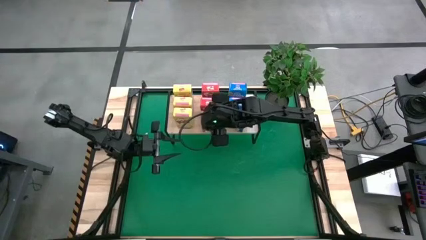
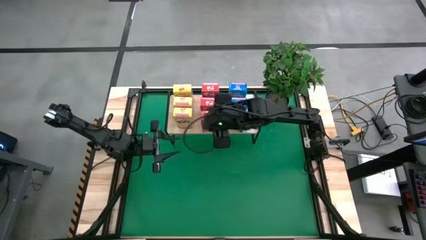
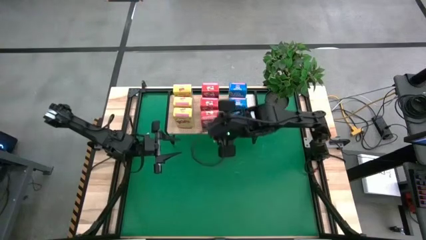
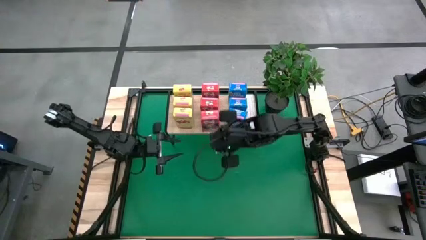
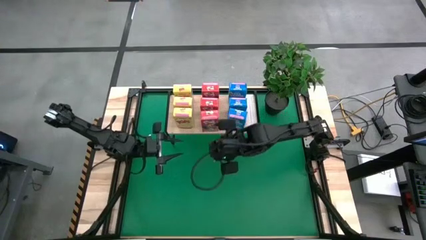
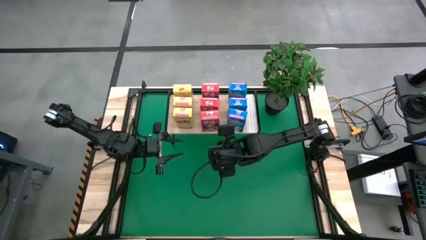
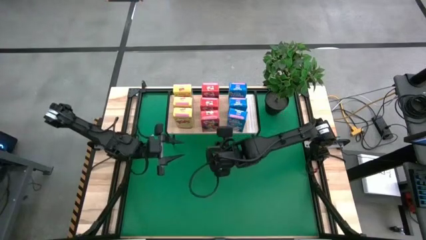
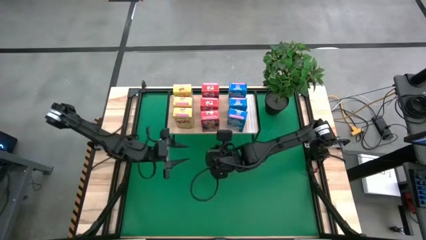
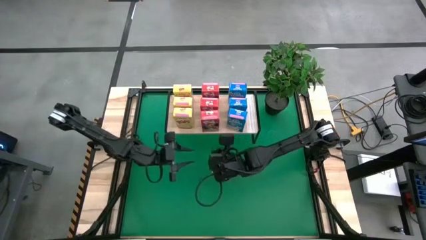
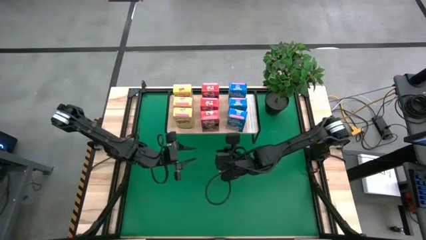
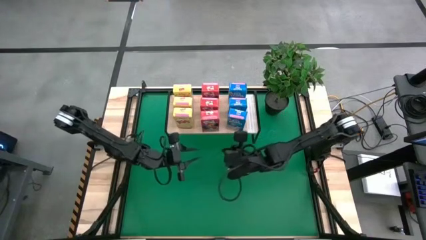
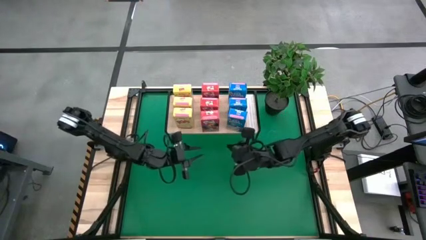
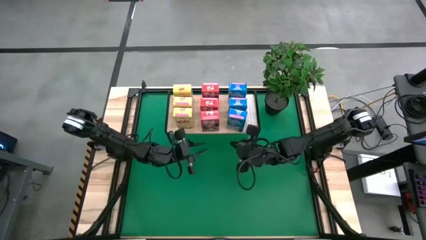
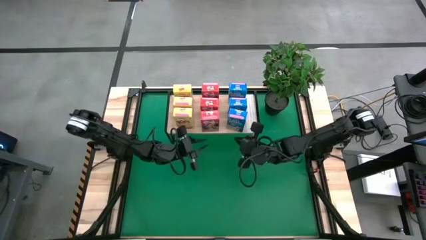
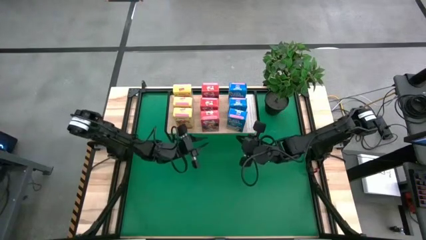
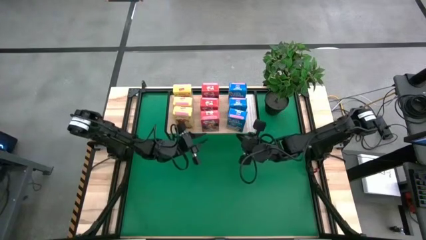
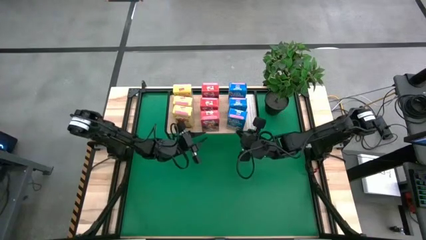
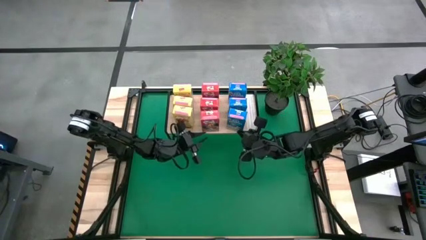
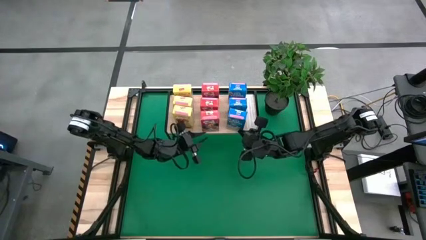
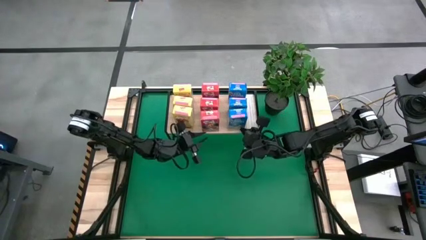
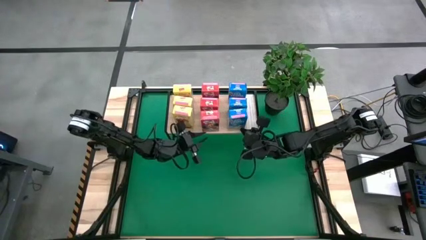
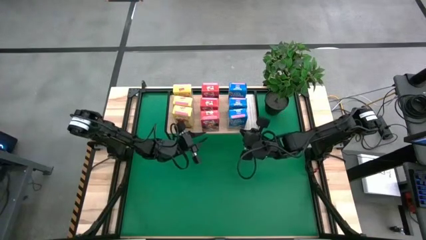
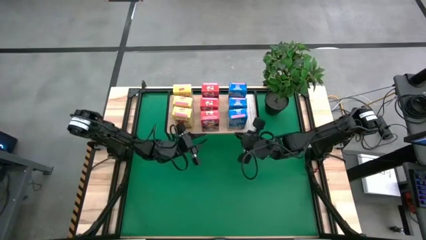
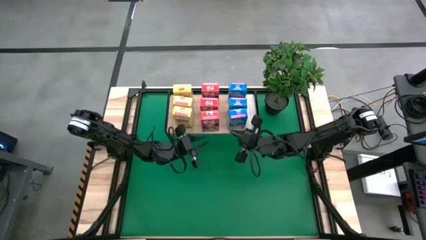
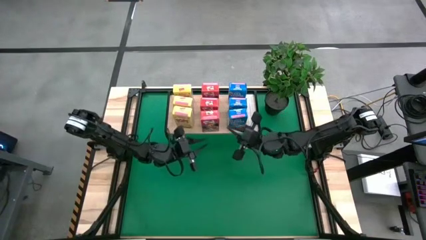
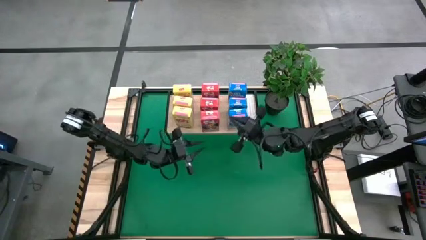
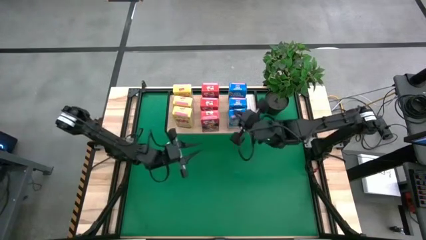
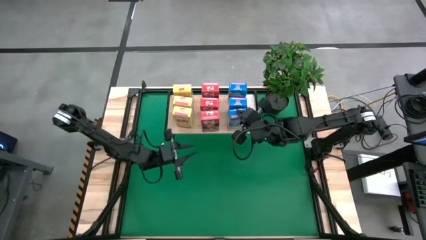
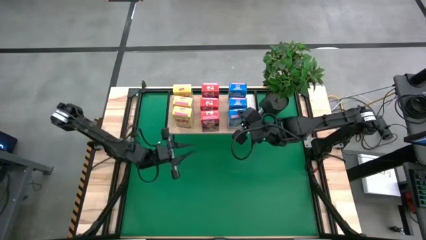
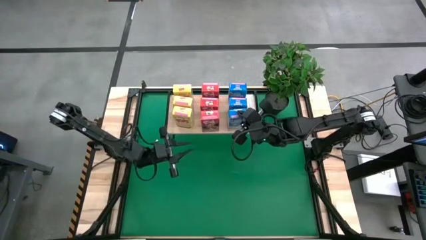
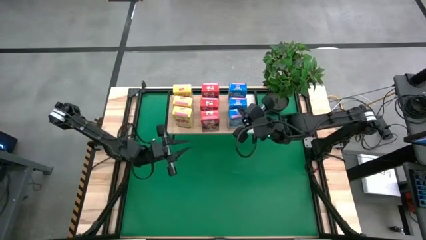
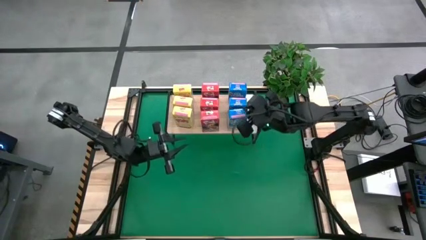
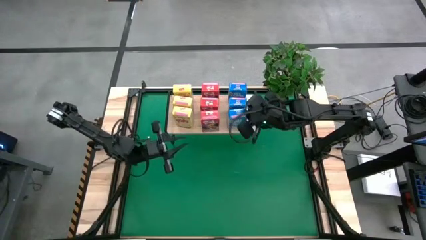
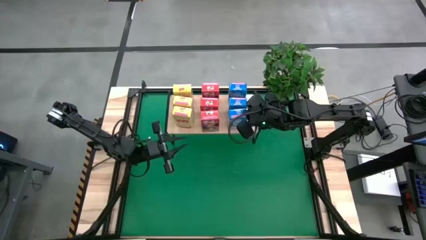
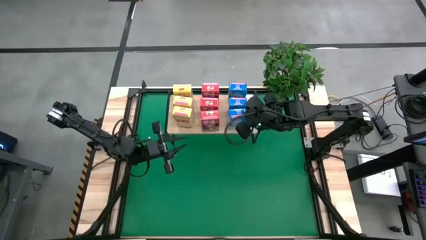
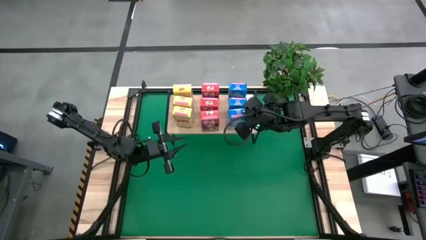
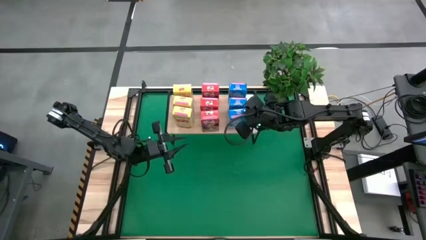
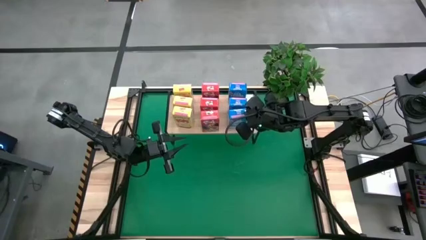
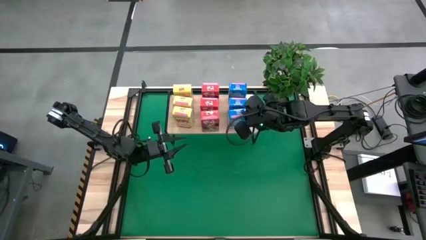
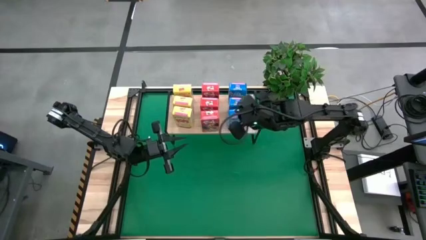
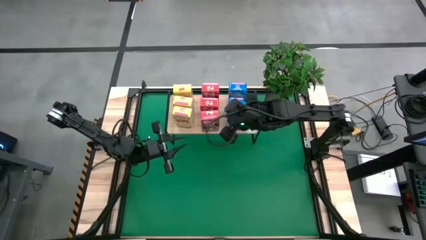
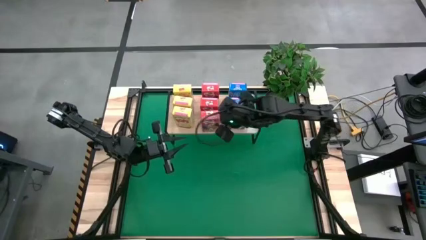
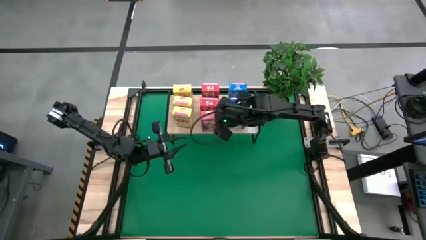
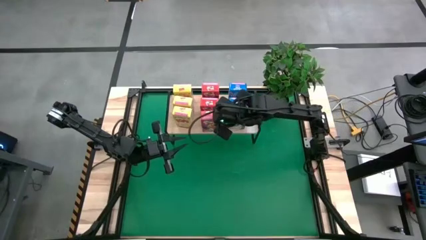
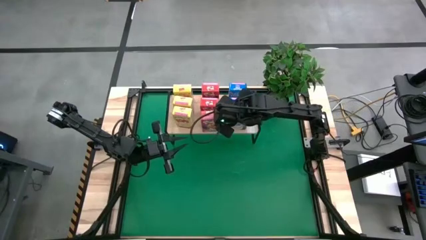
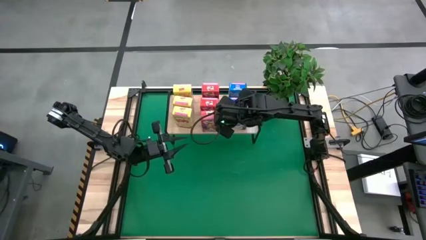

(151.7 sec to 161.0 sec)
Task: Stack cereal on shelf
Adjust the blue cereal box on the shelf

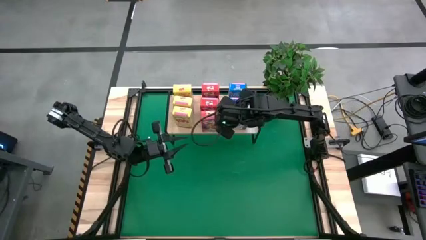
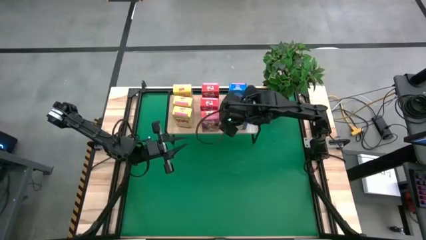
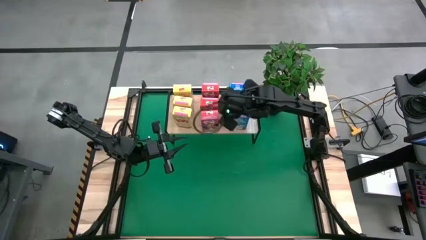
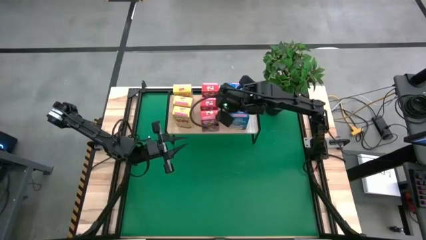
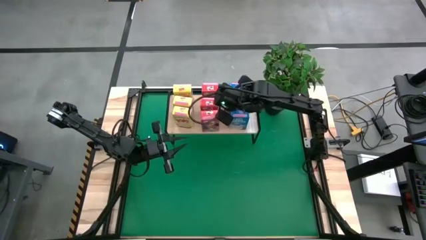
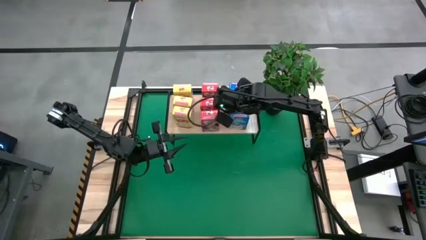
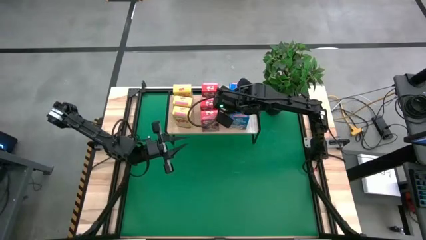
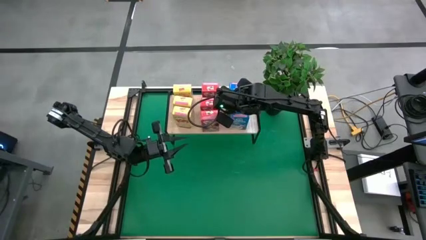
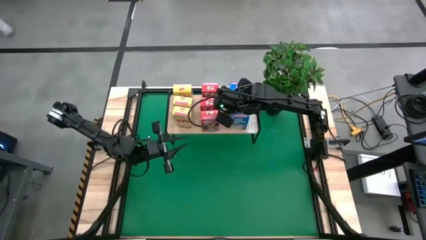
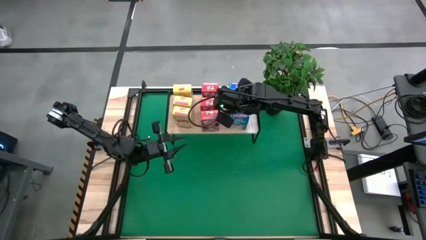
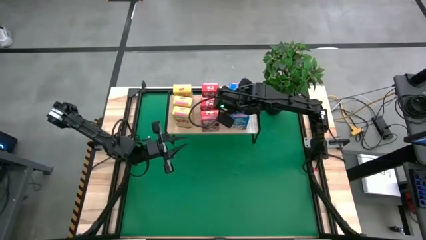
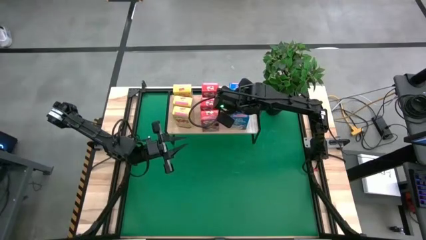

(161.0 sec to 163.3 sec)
Adjust the blue cereal box on the shelf

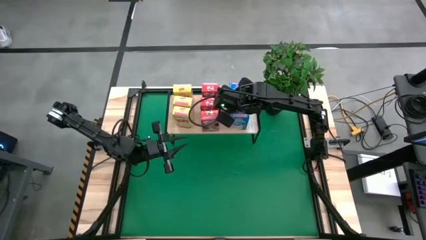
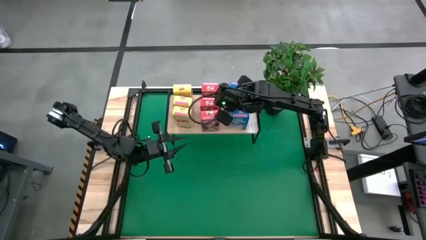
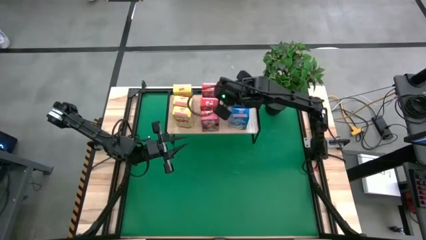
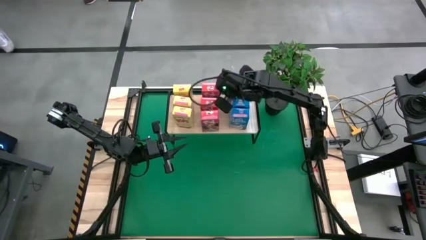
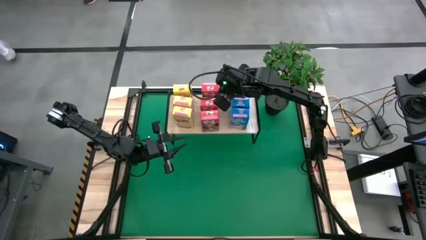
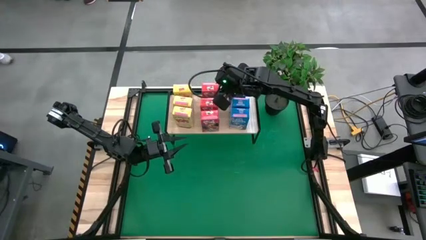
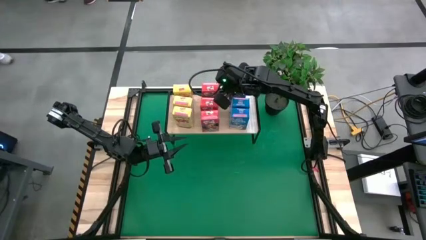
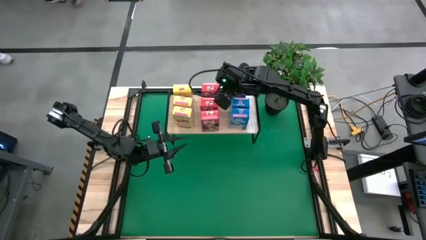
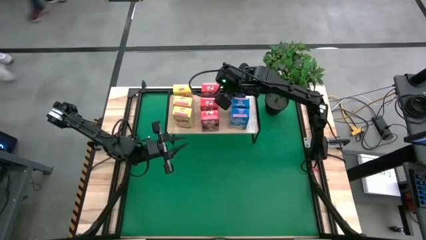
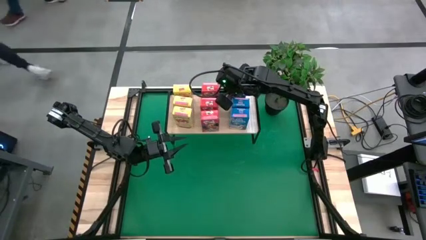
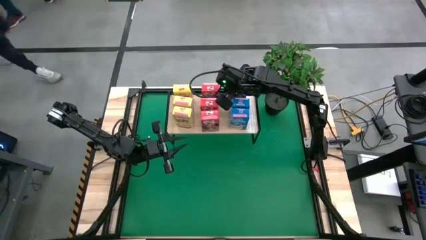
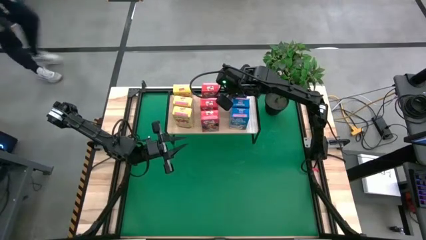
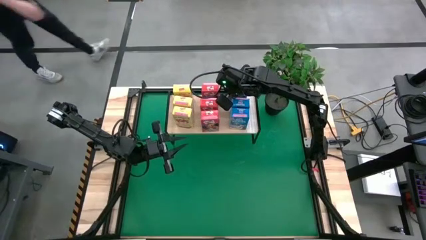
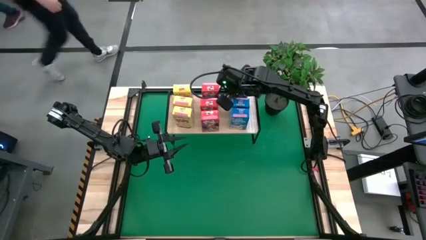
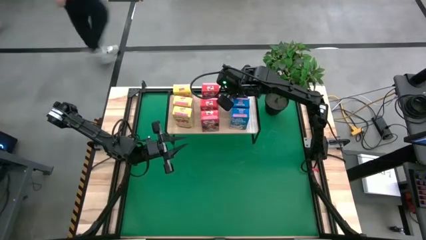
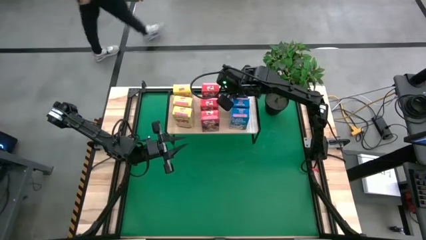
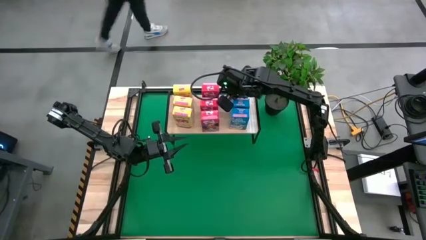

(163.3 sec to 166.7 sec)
Adjust the blue cereal box on the shelf

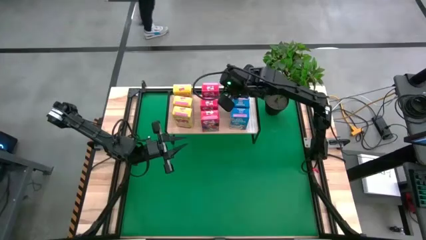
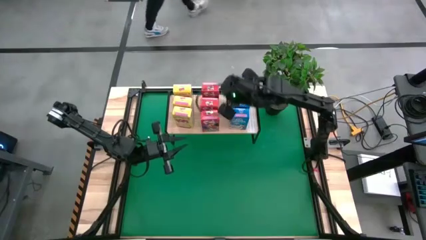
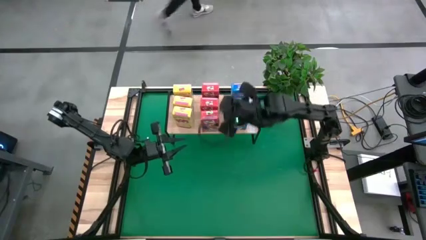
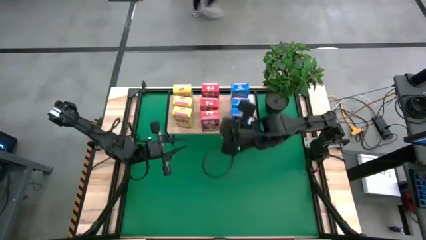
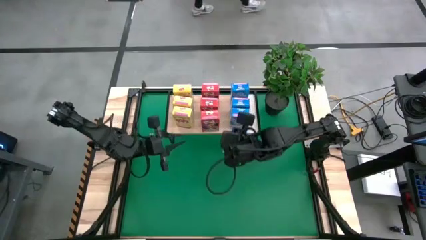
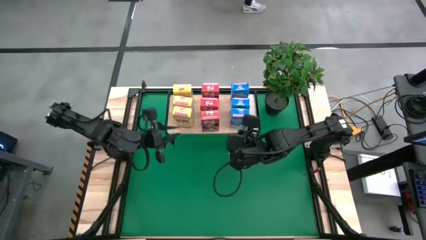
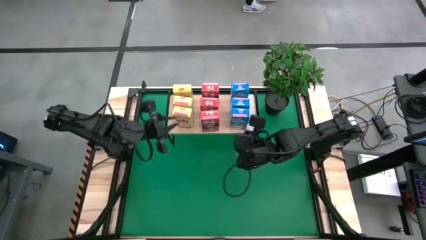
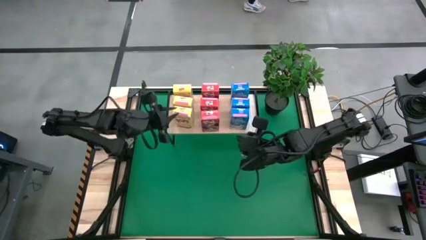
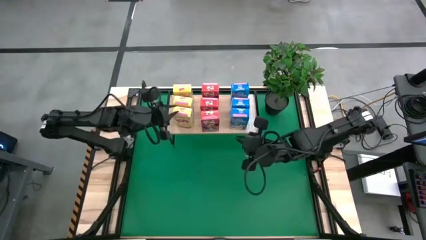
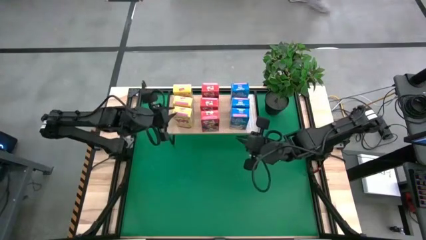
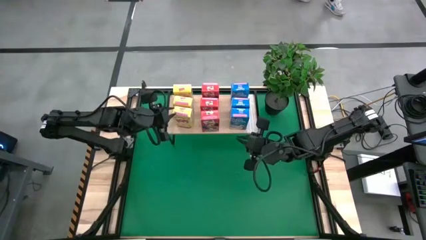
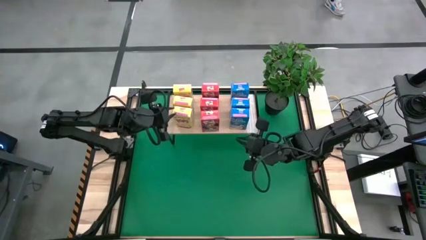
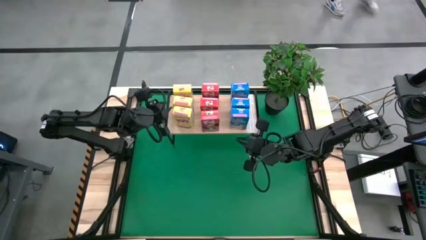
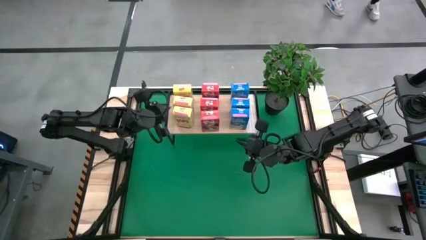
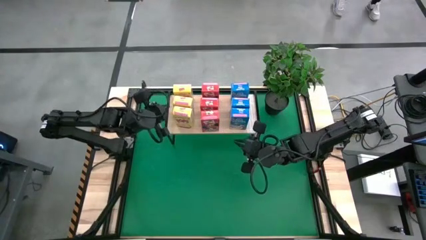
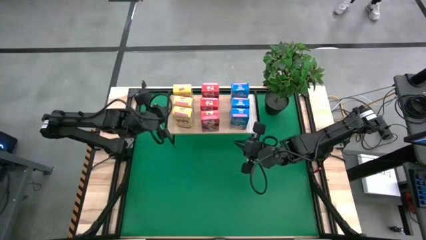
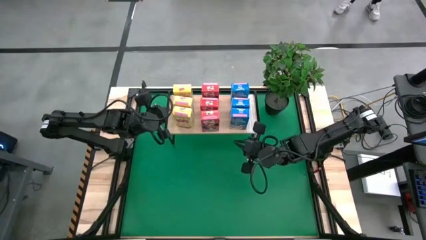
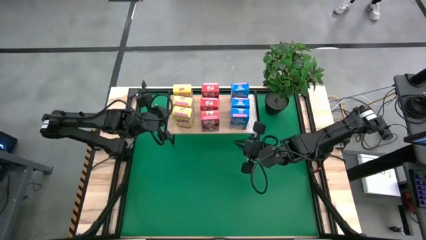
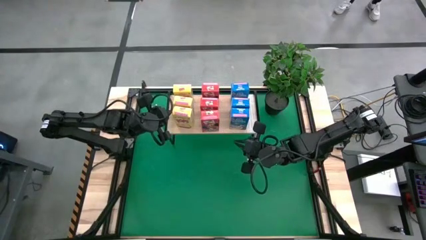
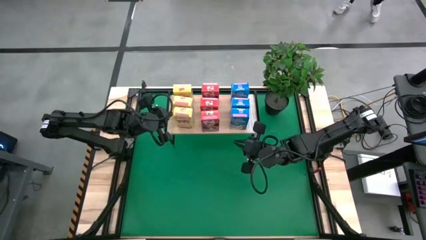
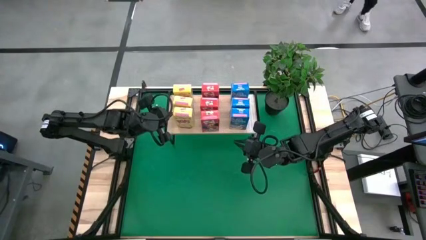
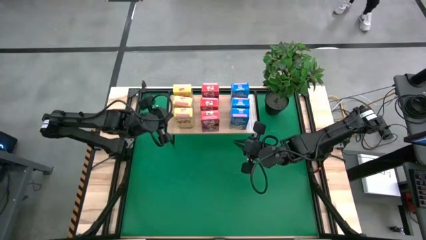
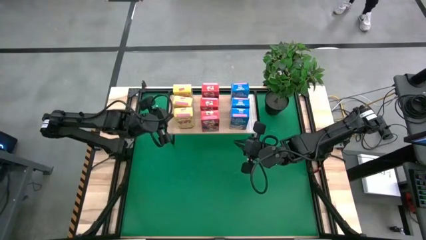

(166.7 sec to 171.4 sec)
Adjust the yellow cereal box on the shelf
